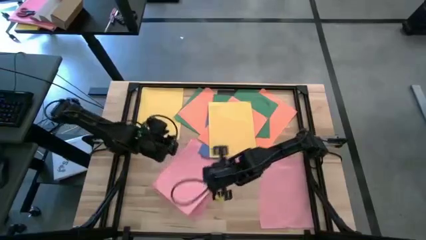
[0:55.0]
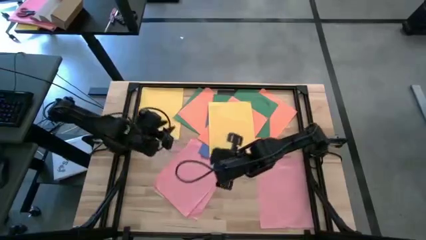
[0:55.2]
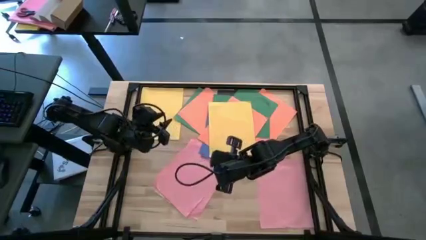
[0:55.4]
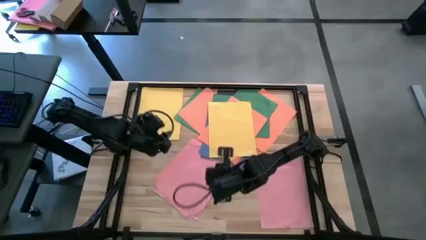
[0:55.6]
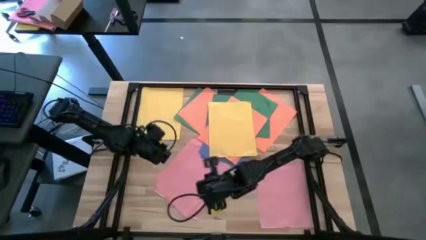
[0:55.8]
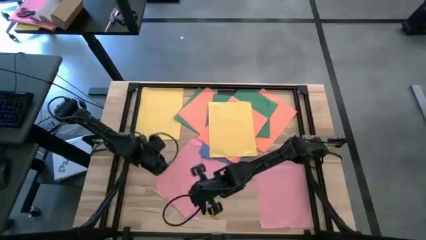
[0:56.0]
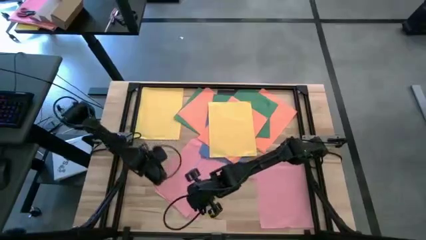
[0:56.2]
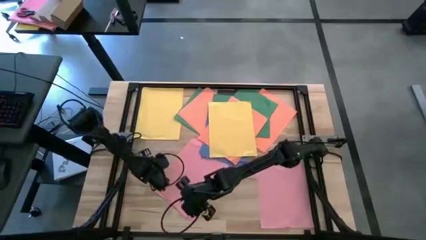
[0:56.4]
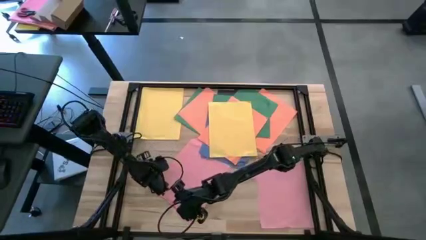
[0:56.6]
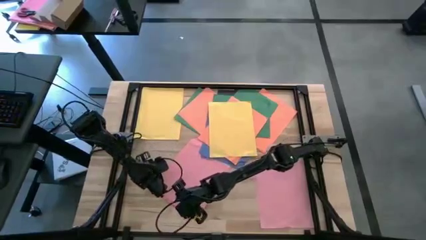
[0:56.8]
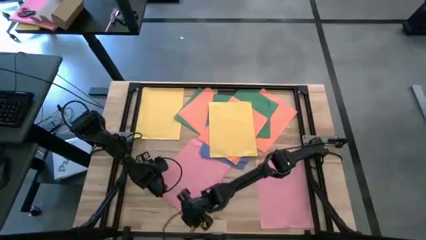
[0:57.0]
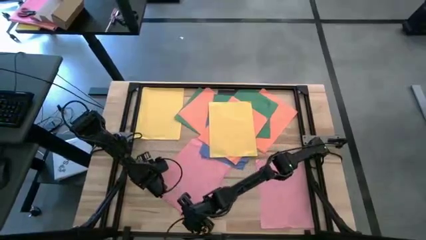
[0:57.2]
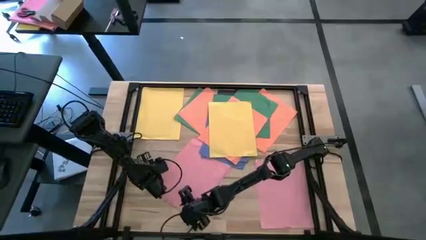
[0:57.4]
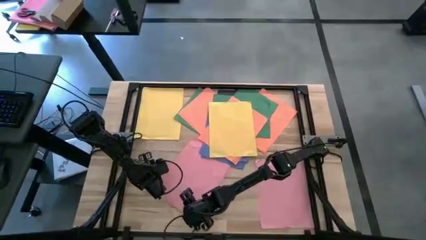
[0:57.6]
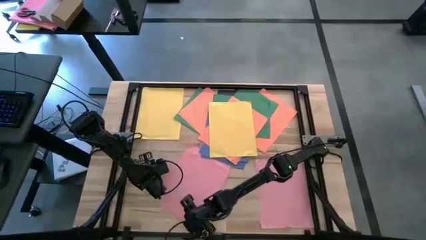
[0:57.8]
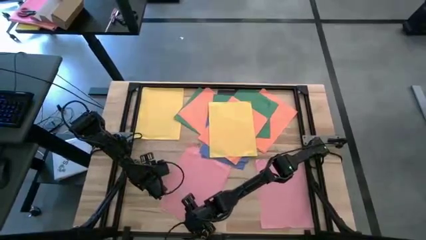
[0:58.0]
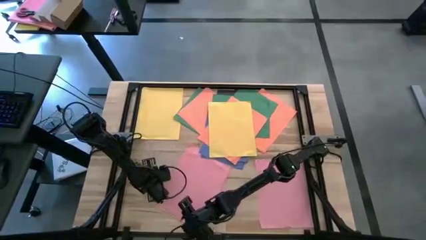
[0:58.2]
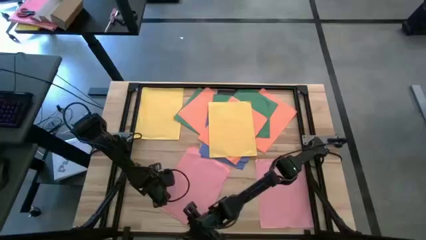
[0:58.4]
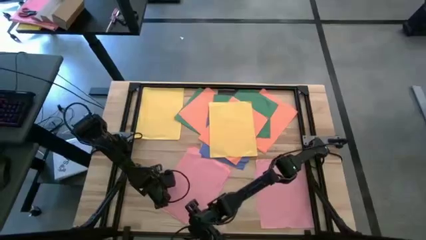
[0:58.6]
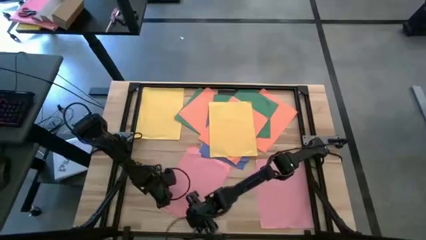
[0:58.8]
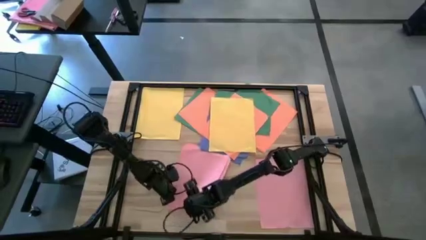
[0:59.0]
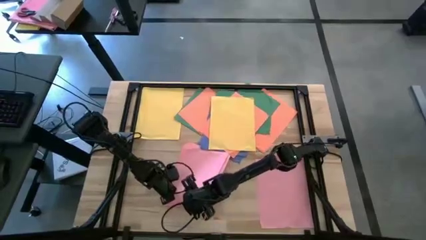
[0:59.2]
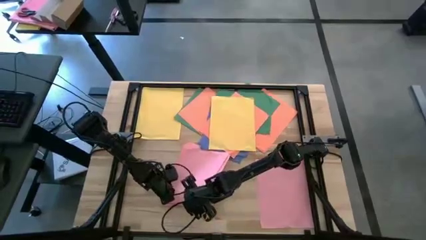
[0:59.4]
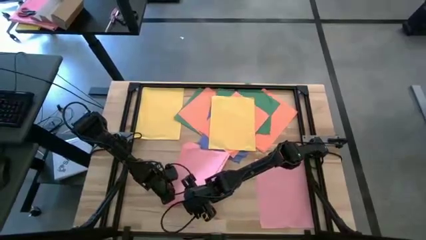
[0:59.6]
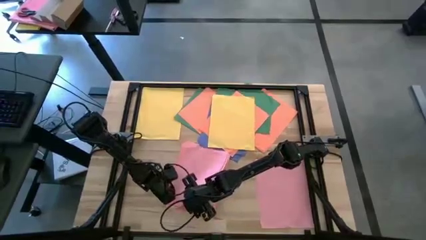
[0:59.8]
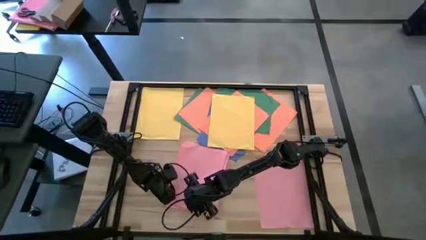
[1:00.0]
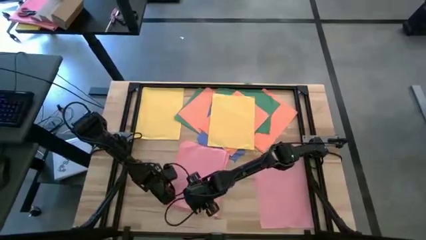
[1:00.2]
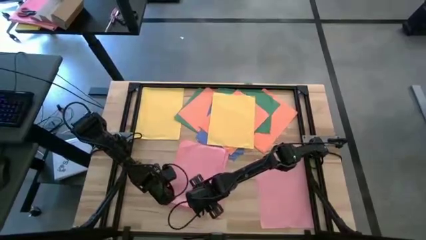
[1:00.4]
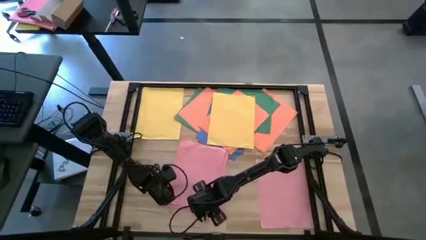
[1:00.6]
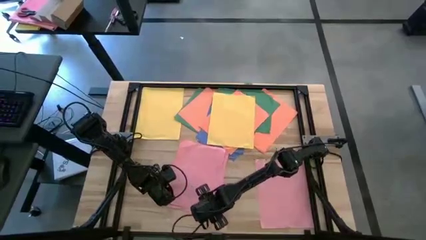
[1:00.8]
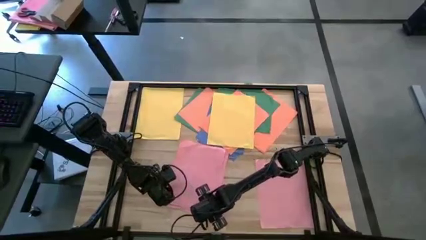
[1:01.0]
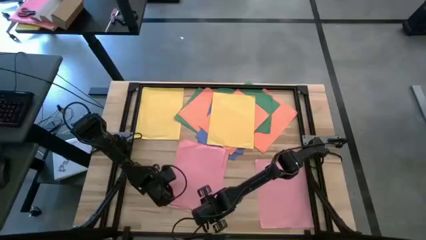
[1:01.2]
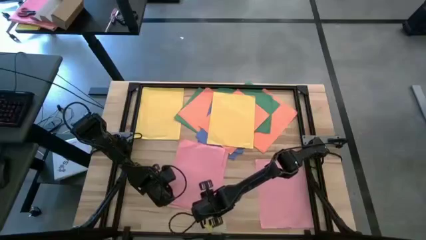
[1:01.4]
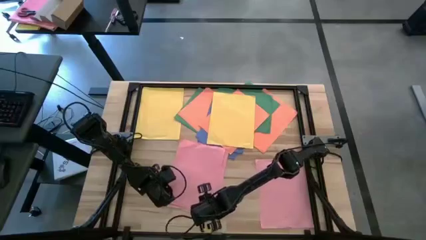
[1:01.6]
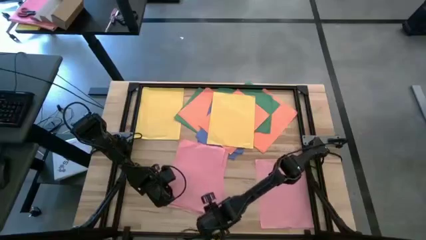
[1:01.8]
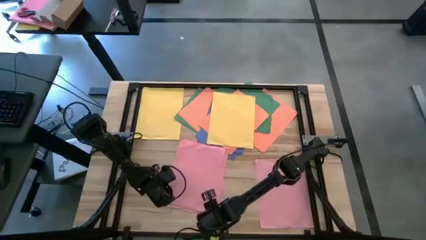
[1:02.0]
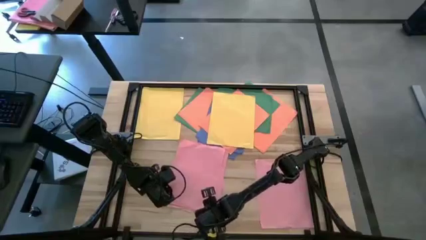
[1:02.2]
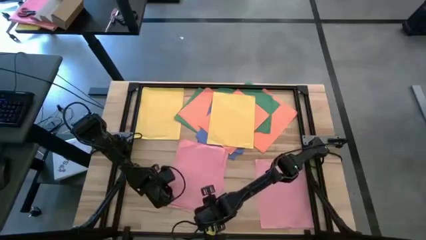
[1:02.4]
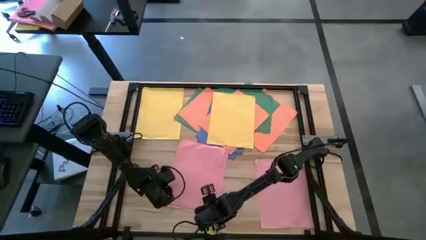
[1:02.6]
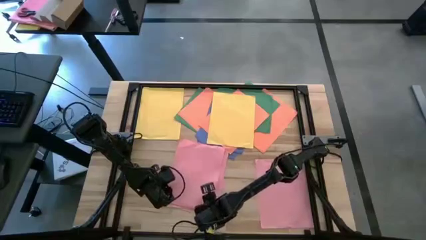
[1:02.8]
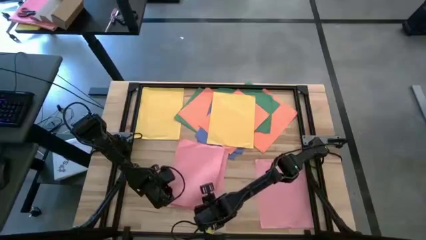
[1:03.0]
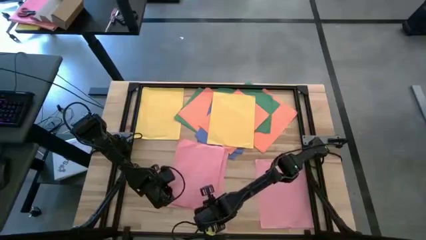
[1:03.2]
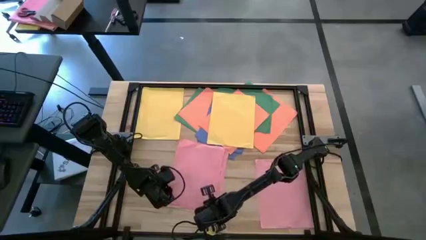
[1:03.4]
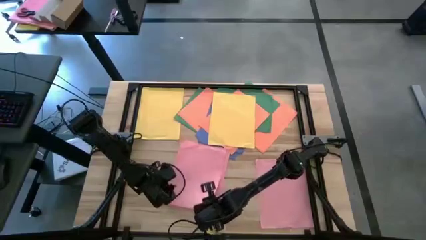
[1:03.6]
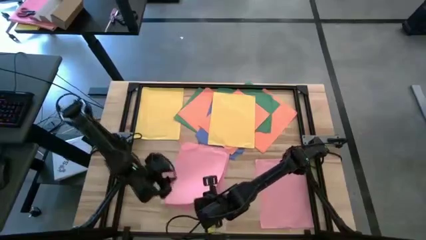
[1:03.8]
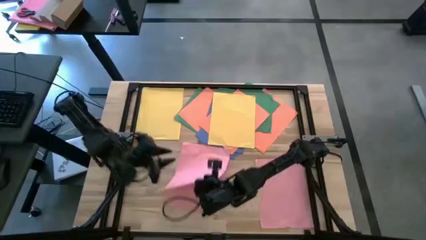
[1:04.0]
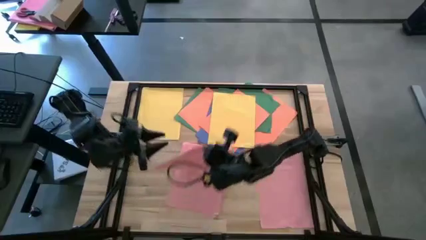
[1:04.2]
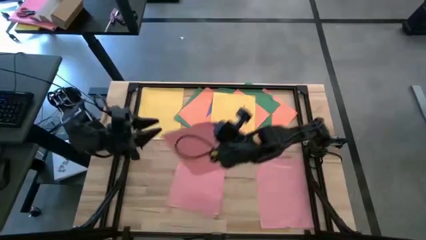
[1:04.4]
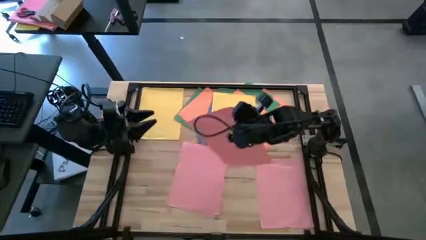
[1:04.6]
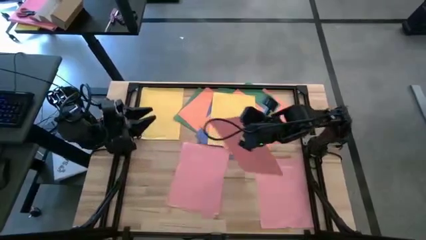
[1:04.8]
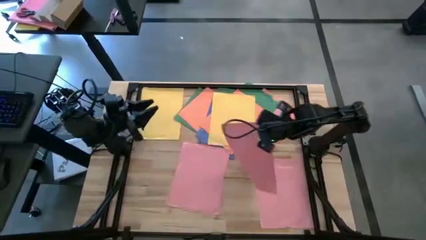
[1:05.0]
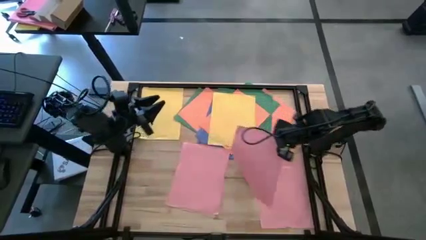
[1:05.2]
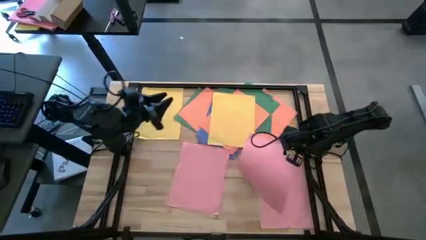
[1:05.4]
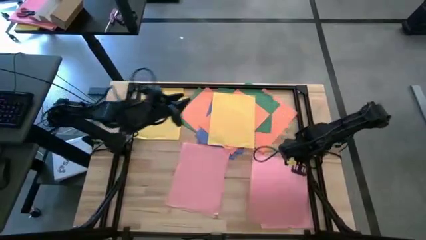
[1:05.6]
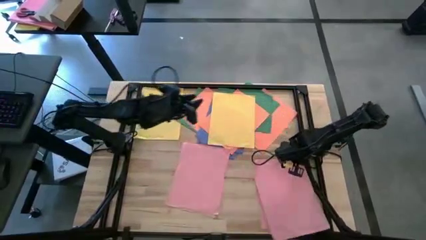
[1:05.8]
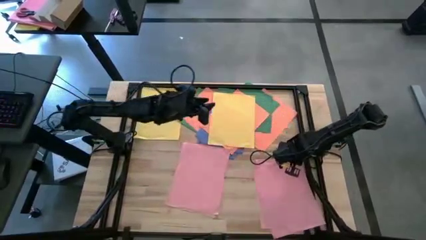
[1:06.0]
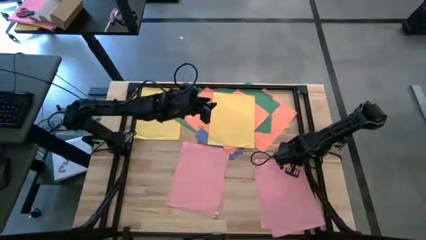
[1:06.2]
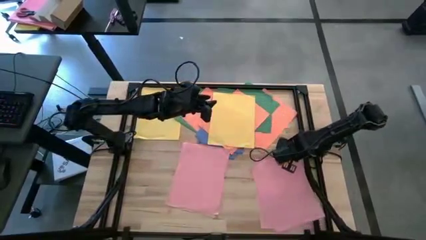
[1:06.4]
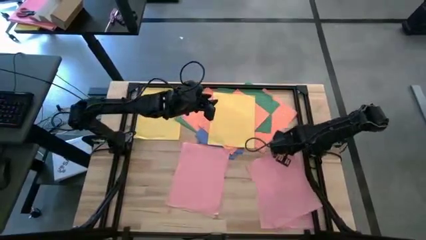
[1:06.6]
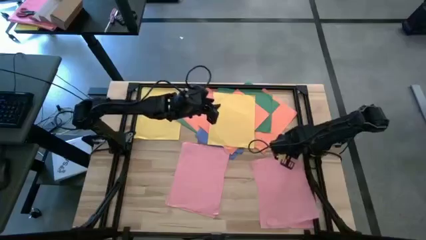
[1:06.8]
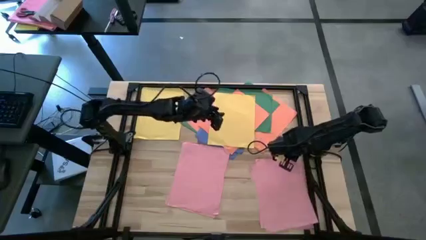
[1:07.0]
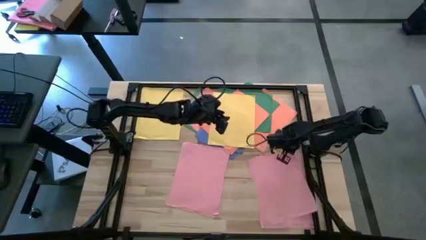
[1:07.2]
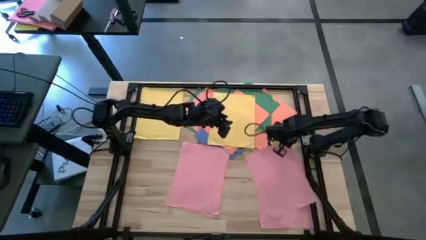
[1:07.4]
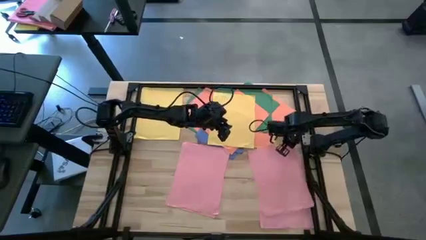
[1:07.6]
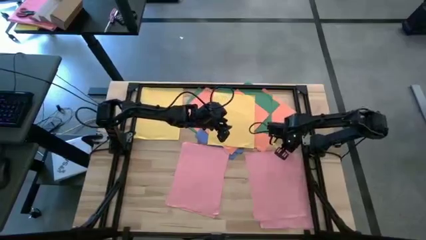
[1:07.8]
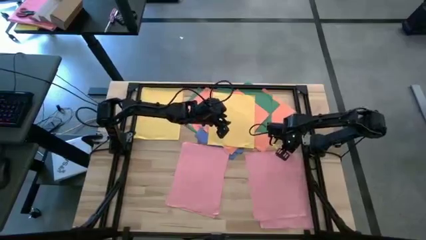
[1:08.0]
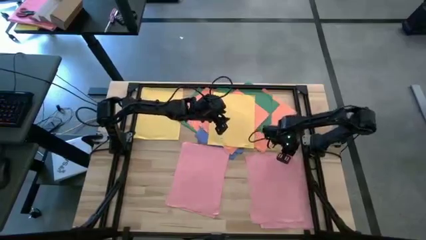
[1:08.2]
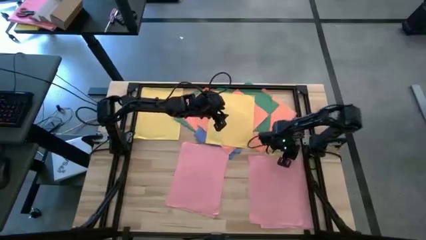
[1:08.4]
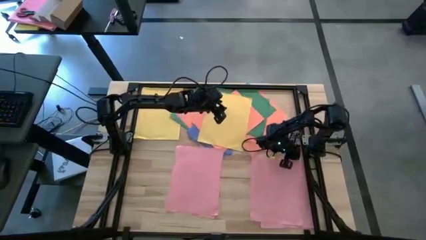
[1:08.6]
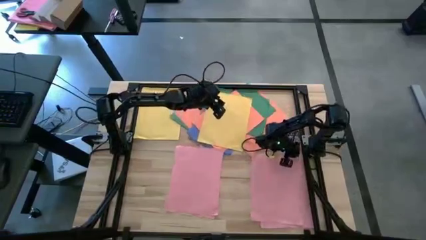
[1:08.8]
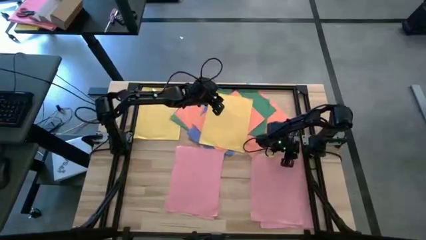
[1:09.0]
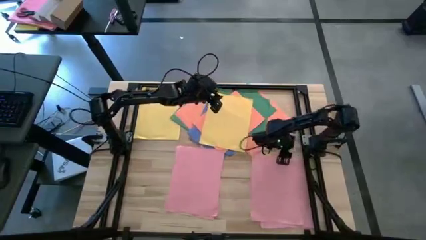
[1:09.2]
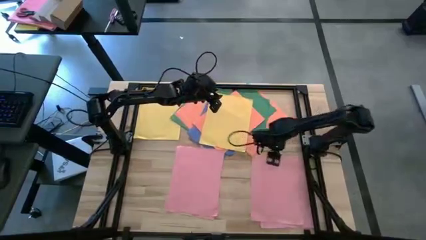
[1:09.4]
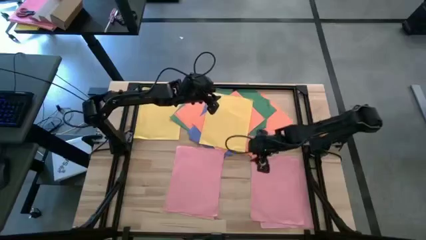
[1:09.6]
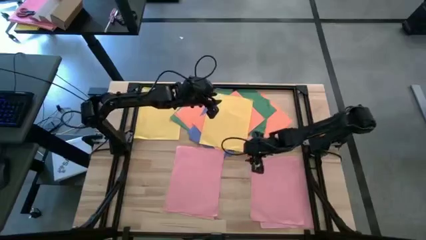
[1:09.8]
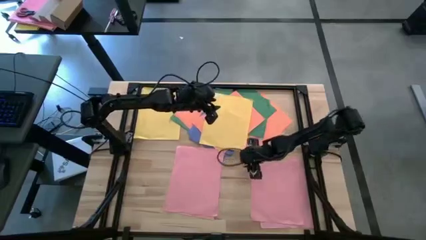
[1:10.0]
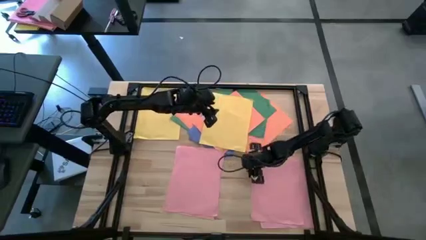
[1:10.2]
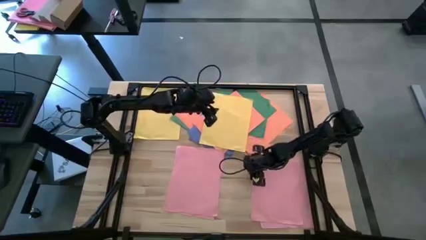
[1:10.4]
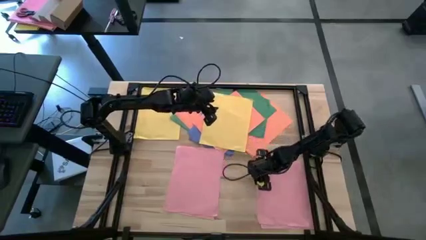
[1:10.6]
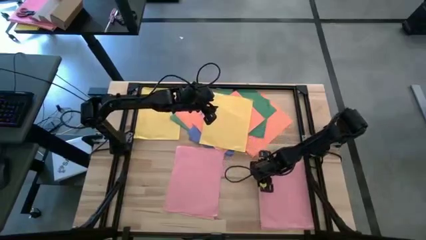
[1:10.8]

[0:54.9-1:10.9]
Task: Organize paper
Stack the pink paper on top of the stacked pink papers
